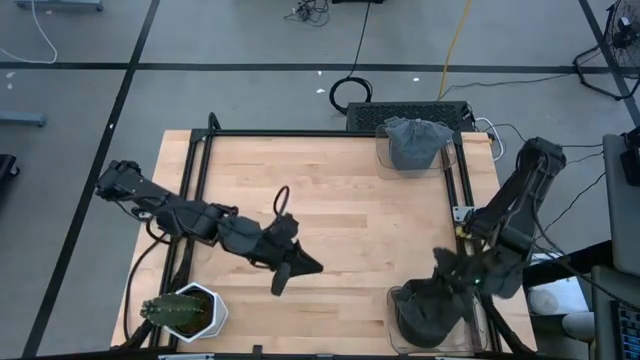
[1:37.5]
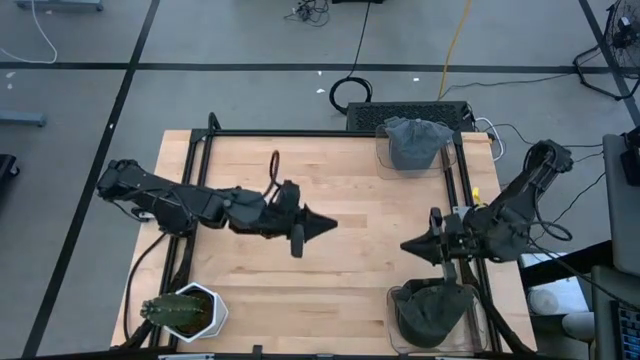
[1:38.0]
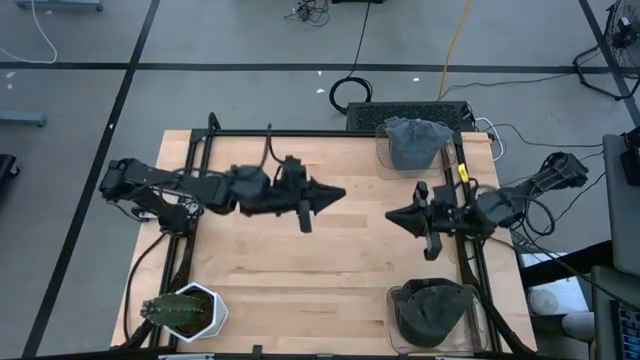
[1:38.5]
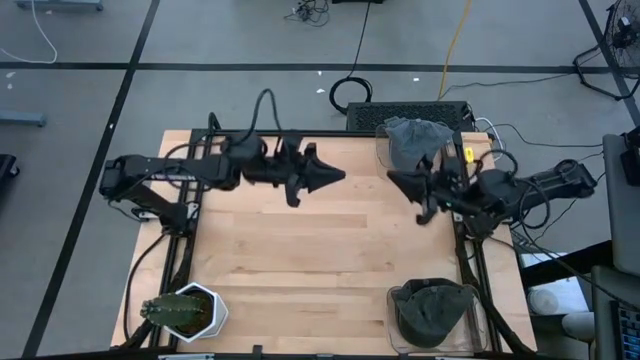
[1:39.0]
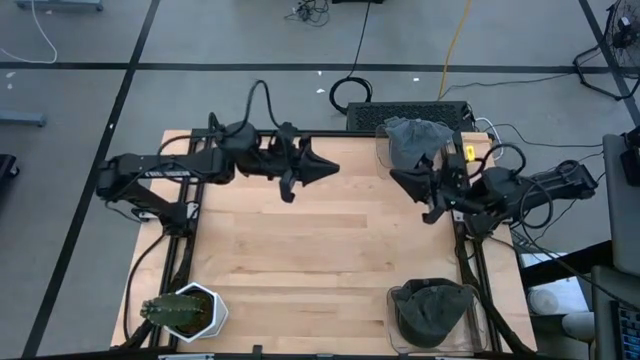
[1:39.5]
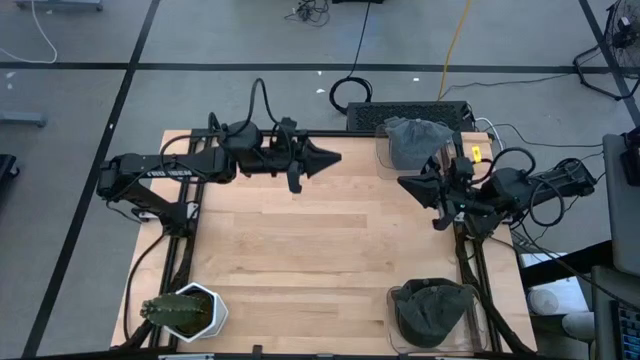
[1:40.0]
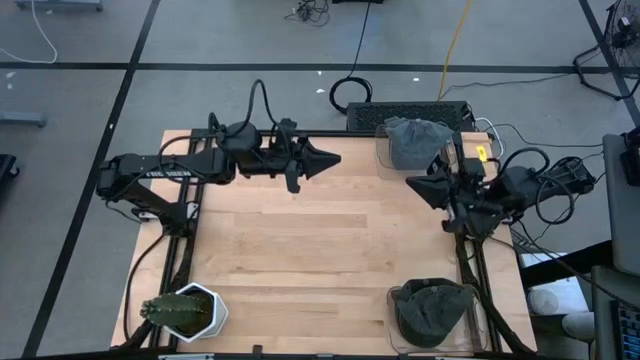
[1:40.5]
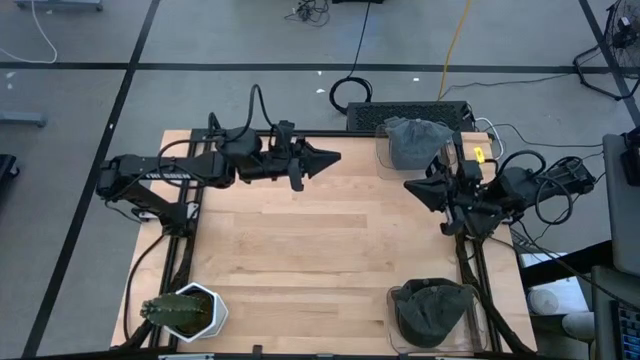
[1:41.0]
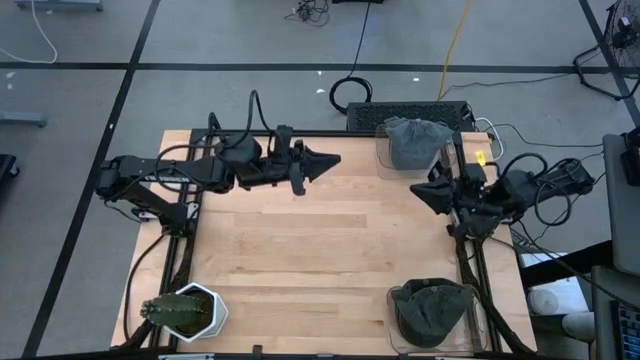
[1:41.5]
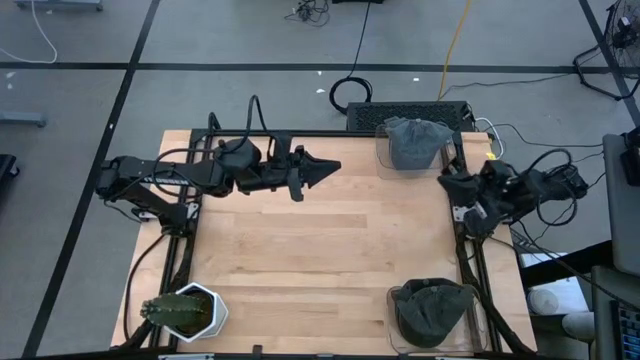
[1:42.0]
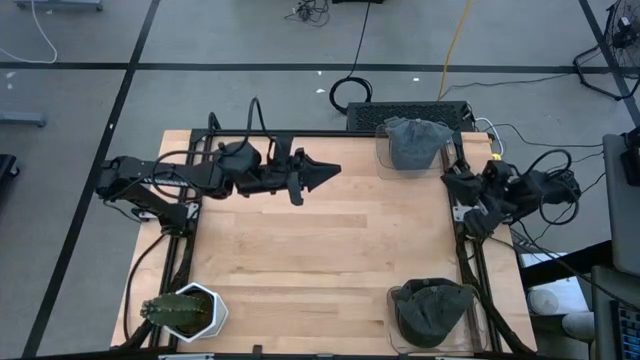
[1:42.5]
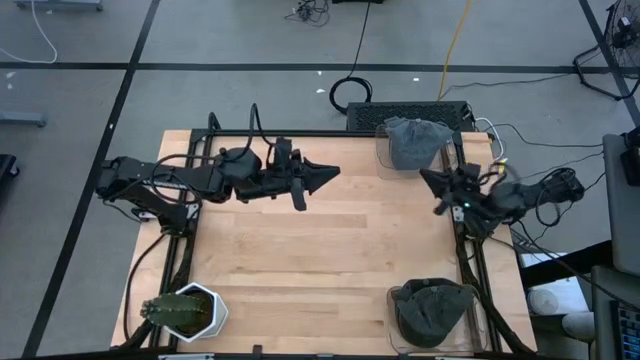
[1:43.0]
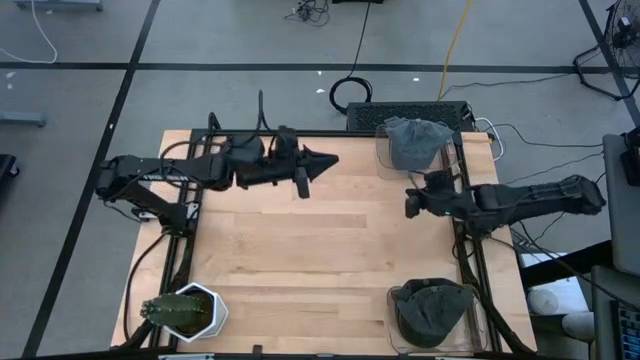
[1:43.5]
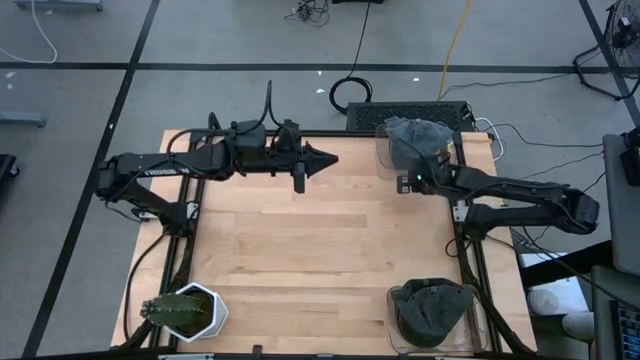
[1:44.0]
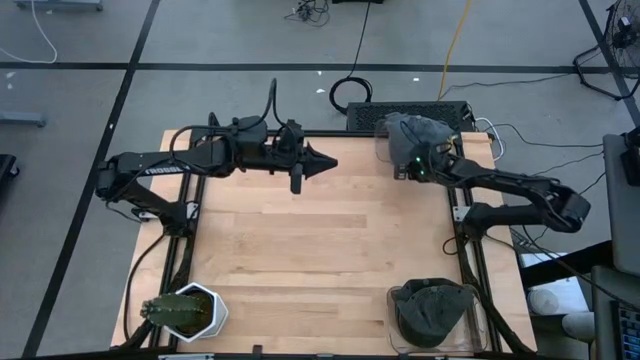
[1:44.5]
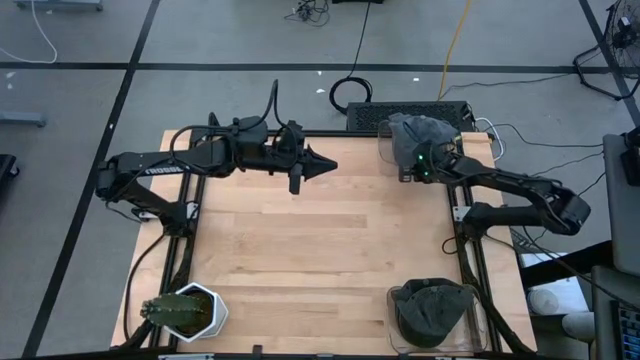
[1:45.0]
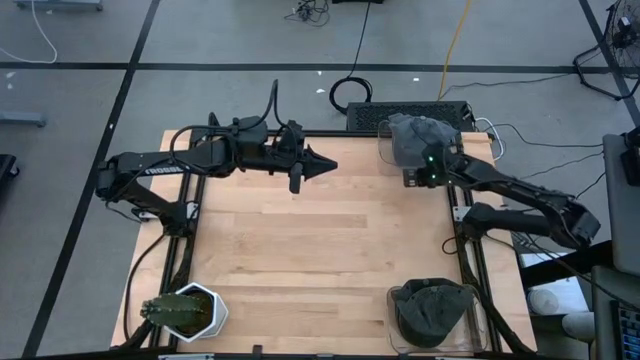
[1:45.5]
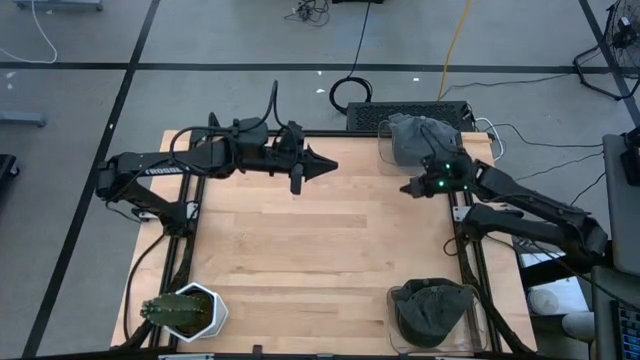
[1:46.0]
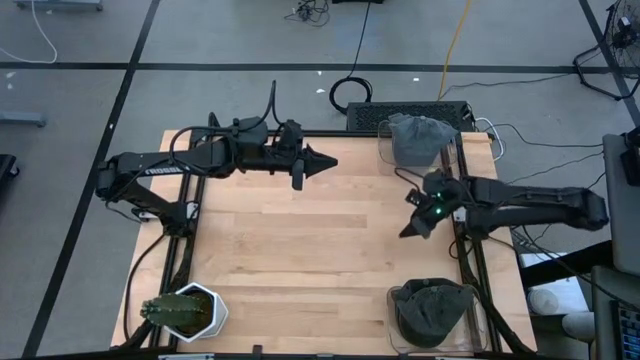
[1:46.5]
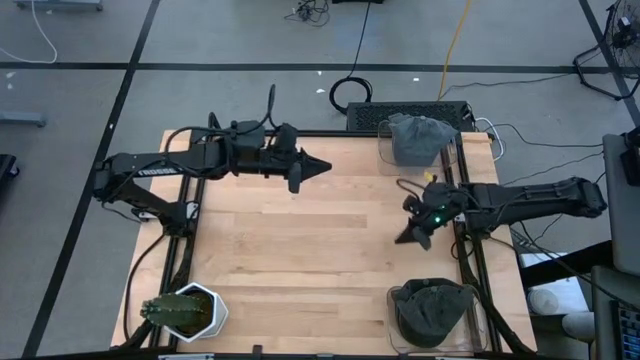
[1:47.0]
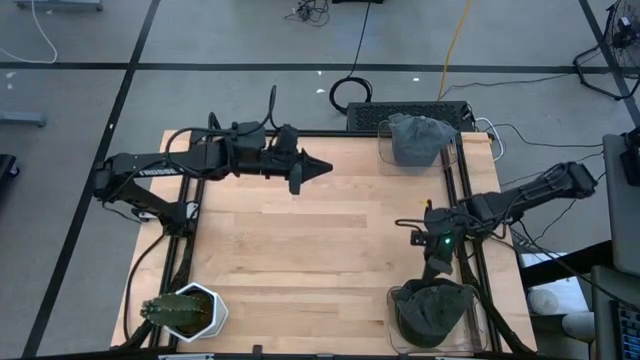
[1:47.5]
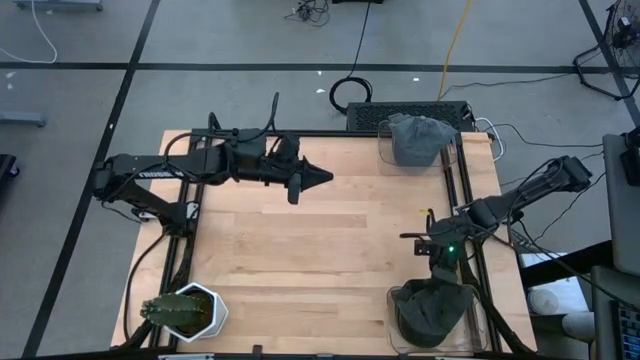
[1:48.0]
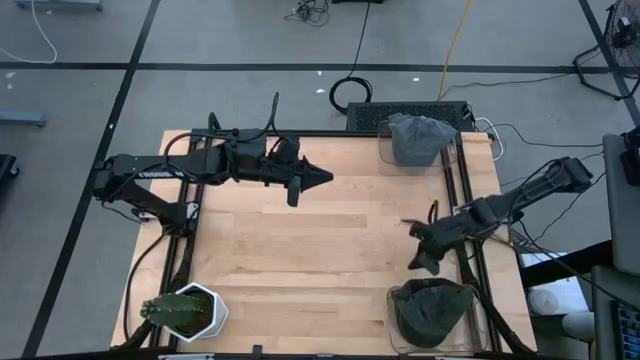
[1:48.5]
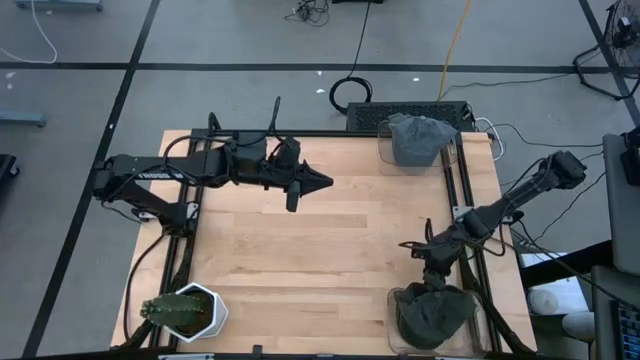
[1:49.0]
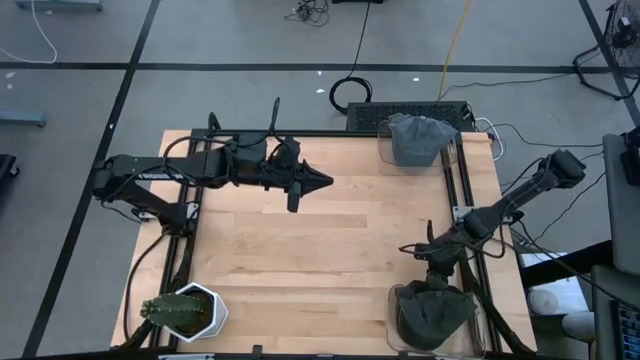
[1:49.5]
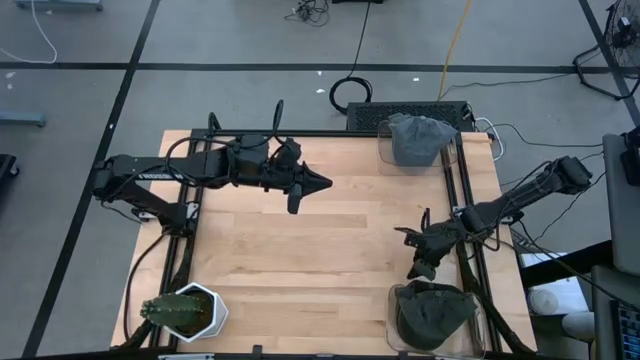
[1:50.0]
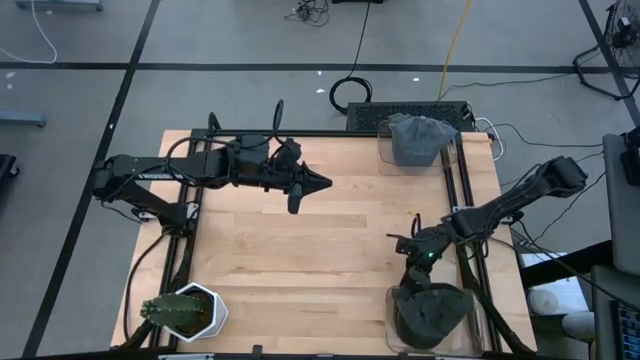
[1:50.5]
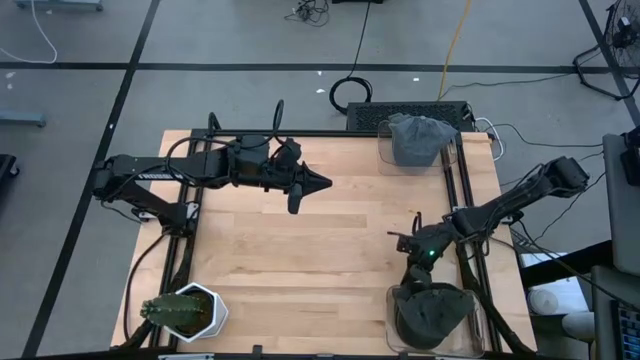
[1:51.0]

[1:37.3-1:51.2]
Task: Pick & Place hat
Adjust the bins

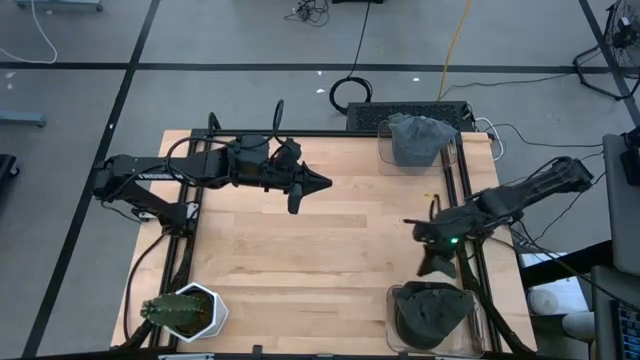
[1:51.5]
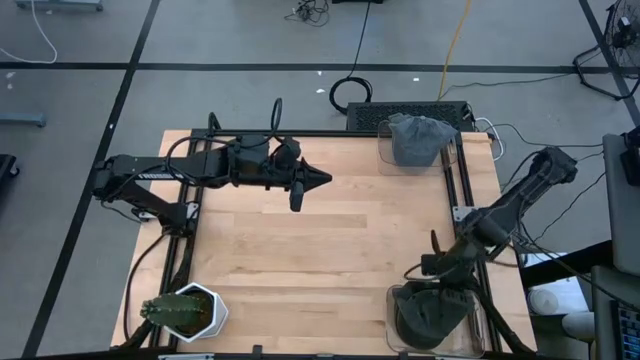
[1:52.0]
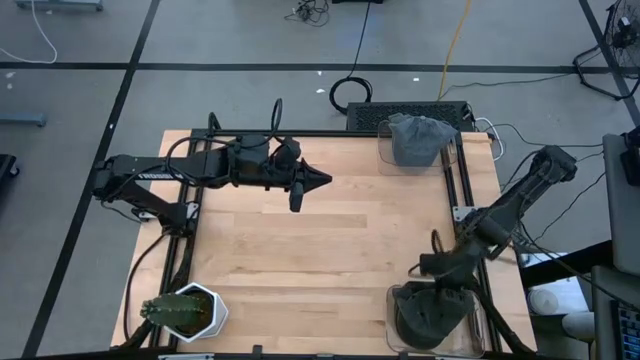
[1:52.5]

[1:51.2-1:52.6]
Adjust the black cap

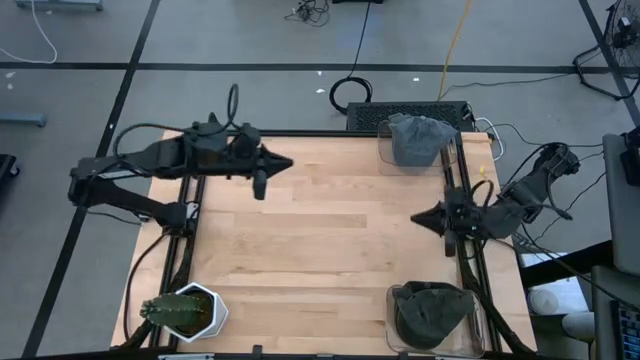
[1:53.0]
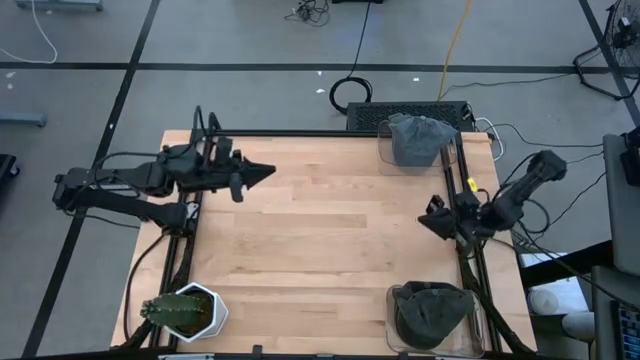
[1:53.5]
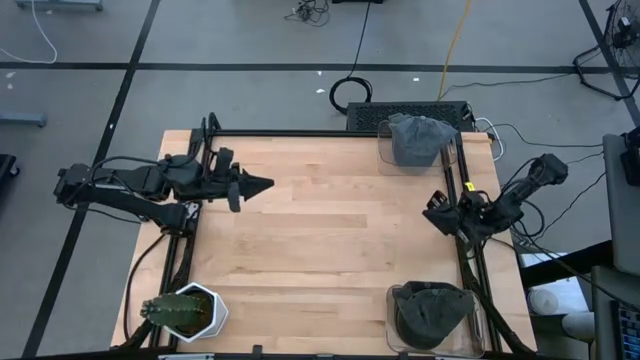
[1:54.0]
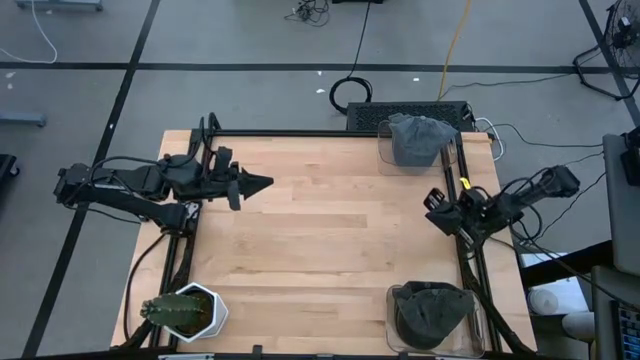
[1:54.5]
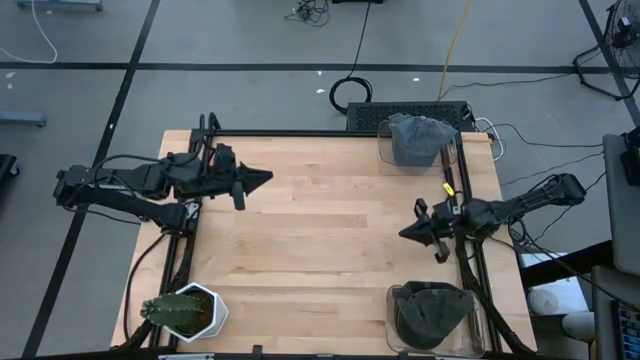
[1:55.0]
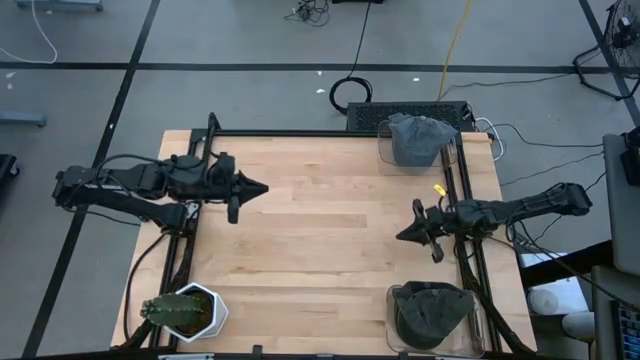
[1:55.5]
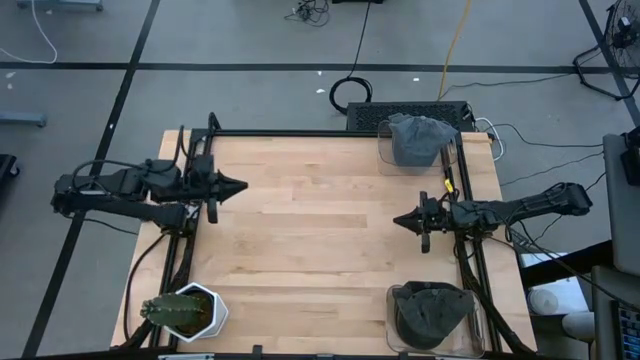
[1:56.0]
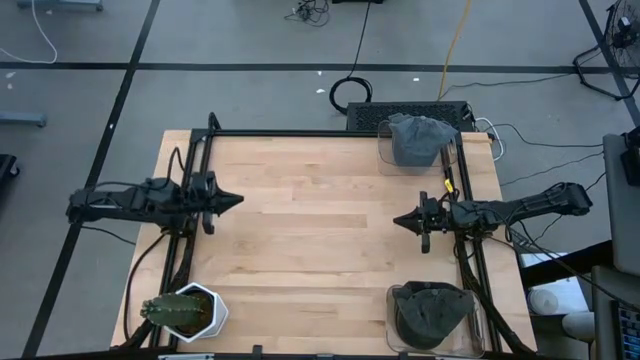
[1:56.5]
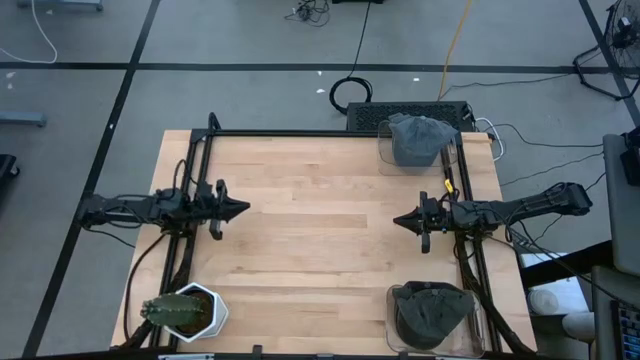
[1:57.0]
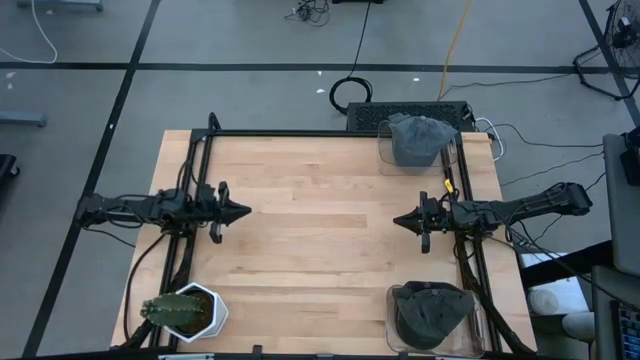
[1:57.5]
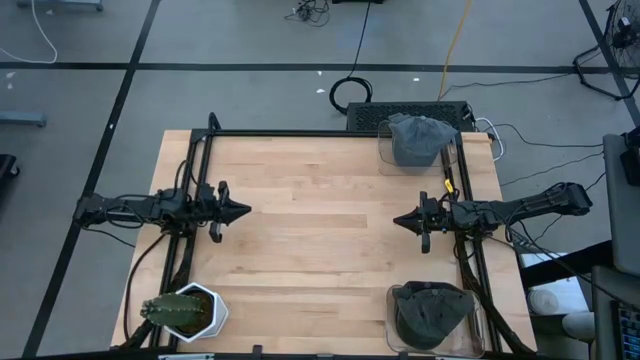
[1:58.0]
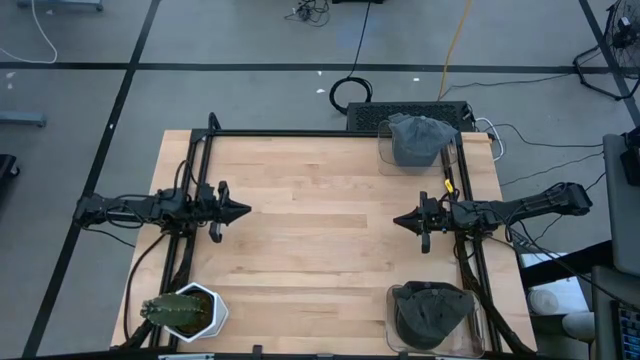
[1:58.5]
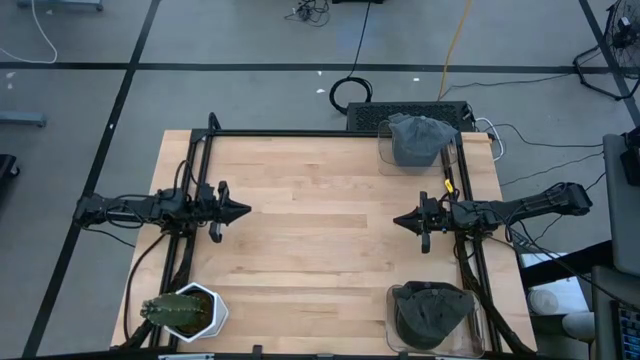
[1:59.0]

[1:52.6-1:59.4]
Return to Home Position

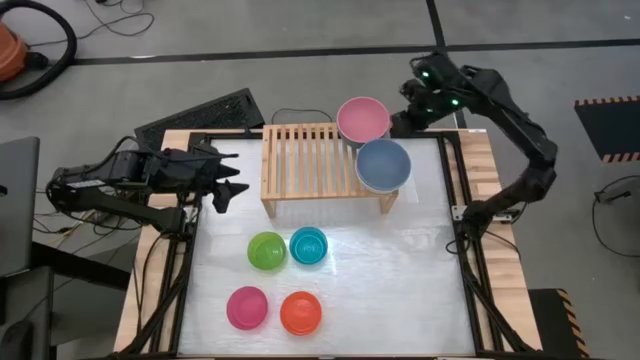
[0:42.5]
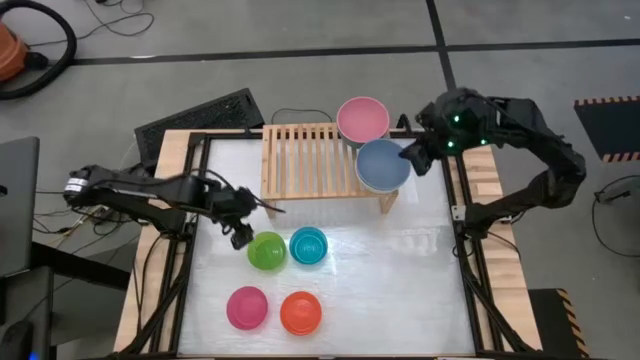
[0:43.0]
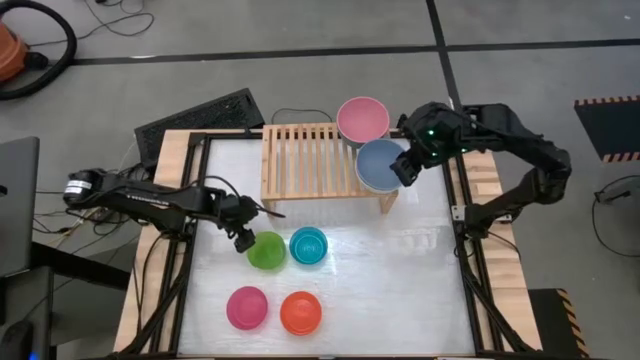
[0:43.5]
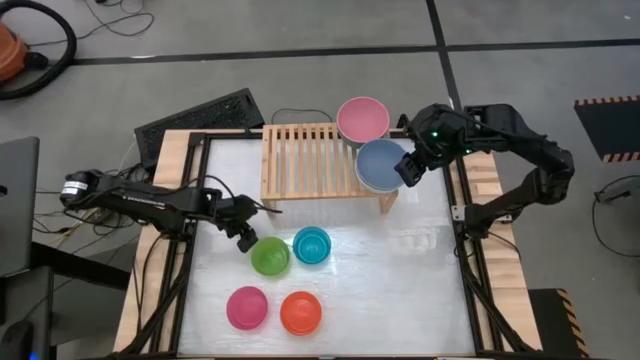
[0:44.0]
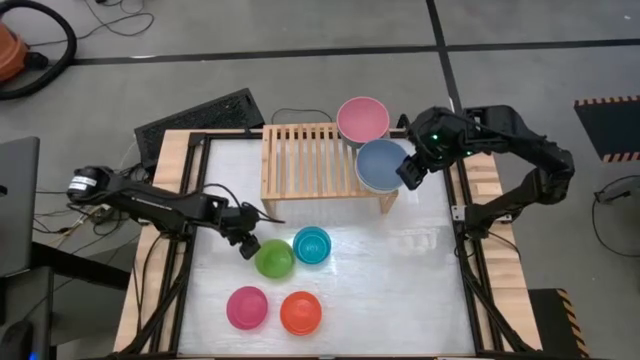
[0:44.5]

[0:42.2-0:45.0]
Task: Place and stack bowls onto a shelf
Put the small green bowl on the shelf
